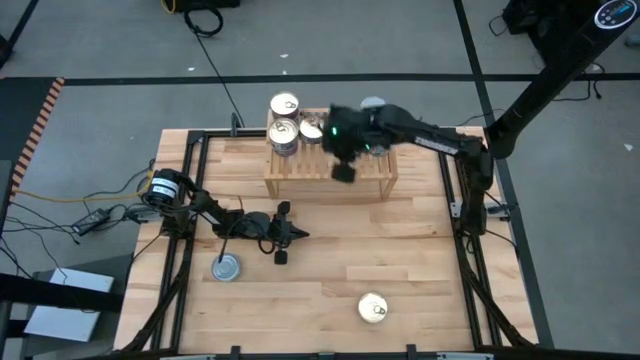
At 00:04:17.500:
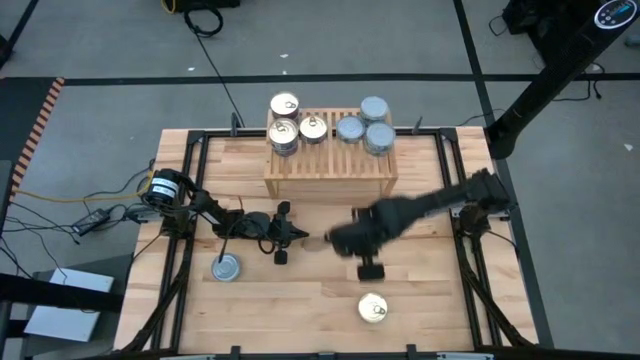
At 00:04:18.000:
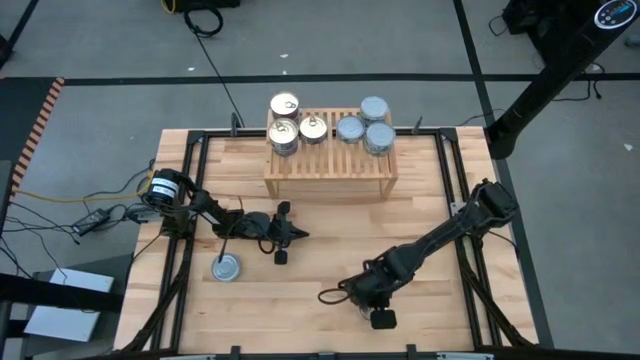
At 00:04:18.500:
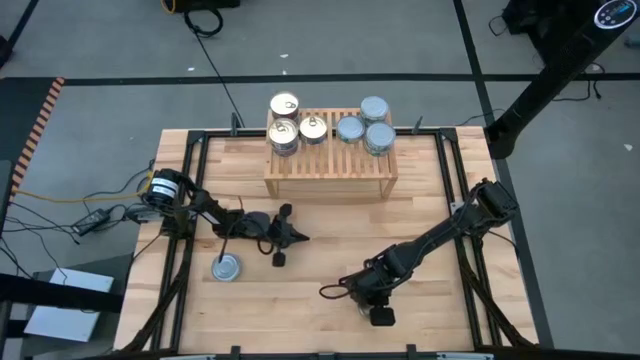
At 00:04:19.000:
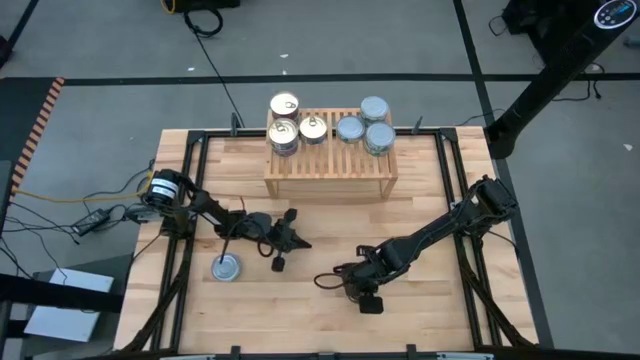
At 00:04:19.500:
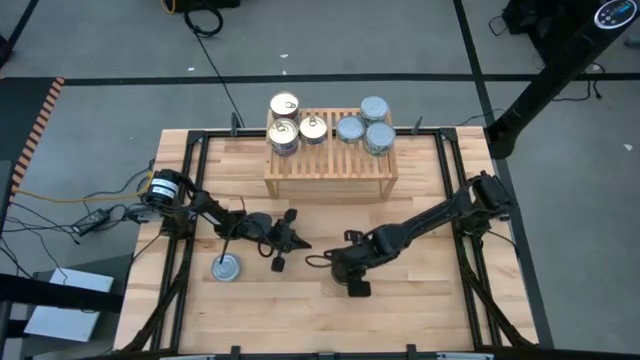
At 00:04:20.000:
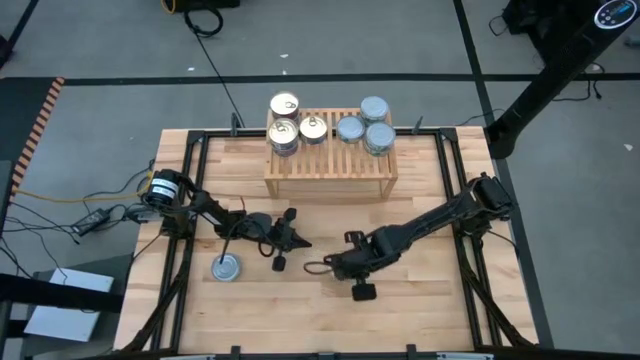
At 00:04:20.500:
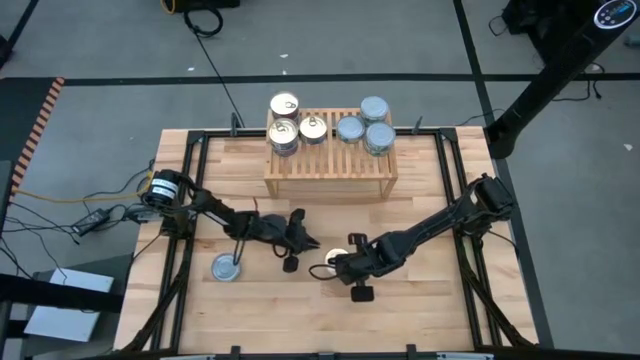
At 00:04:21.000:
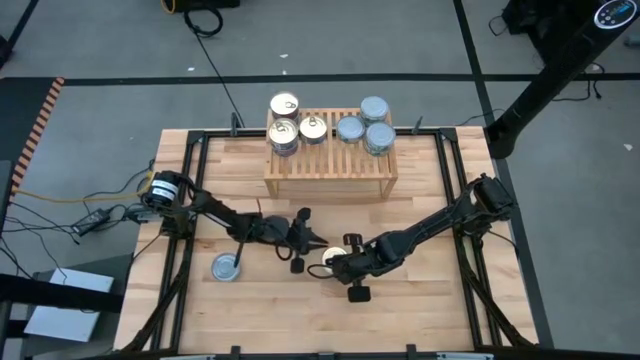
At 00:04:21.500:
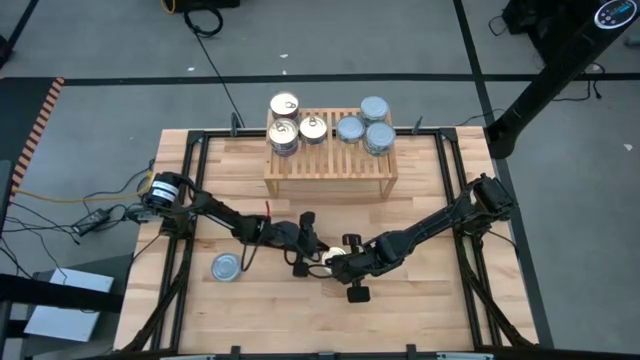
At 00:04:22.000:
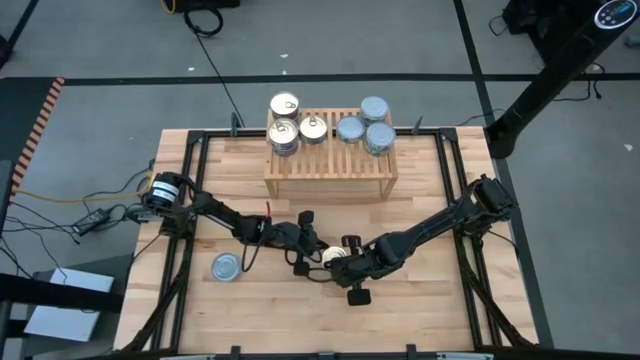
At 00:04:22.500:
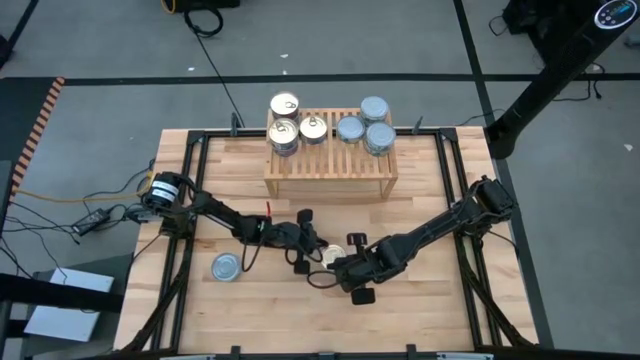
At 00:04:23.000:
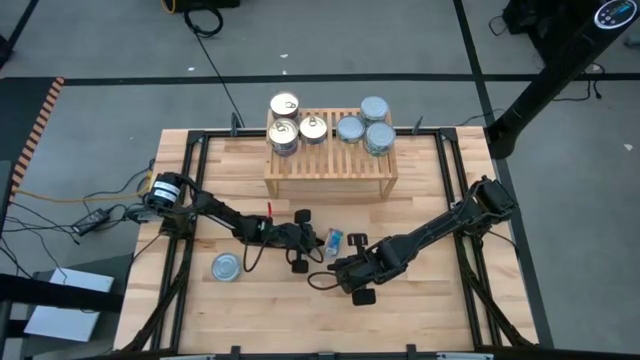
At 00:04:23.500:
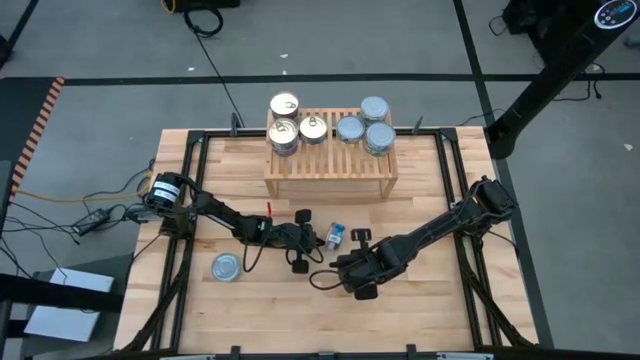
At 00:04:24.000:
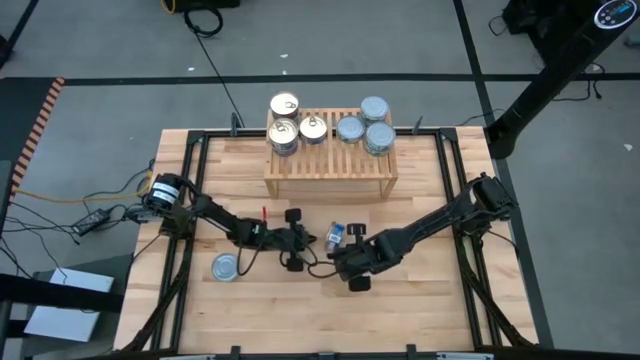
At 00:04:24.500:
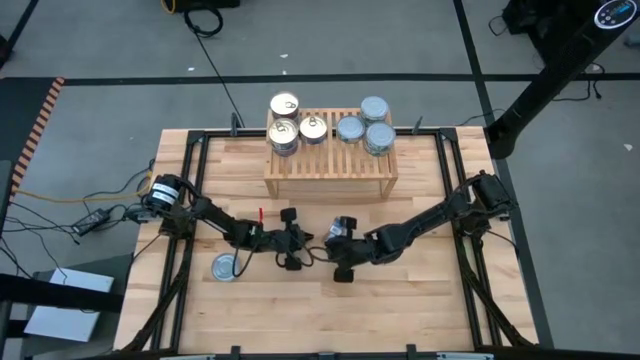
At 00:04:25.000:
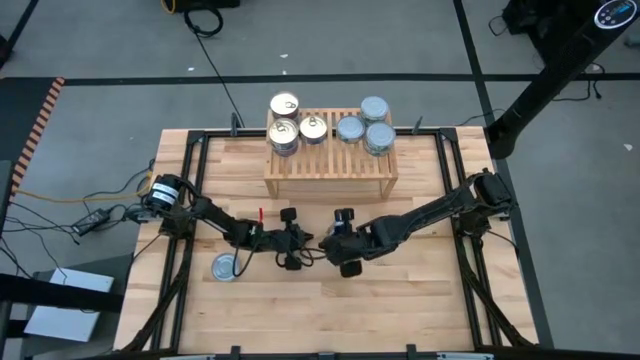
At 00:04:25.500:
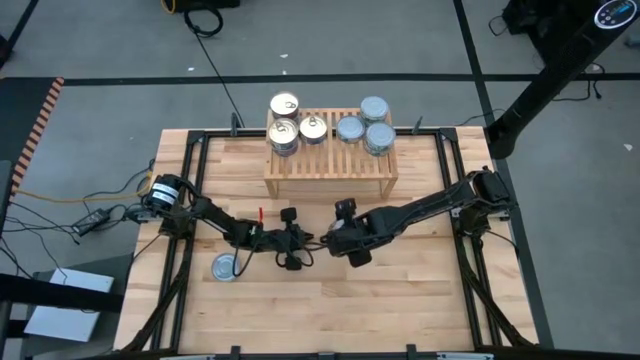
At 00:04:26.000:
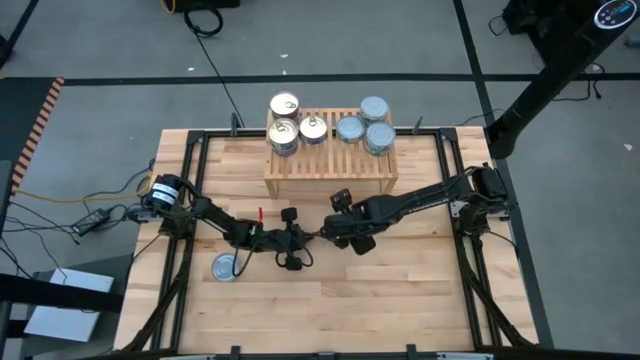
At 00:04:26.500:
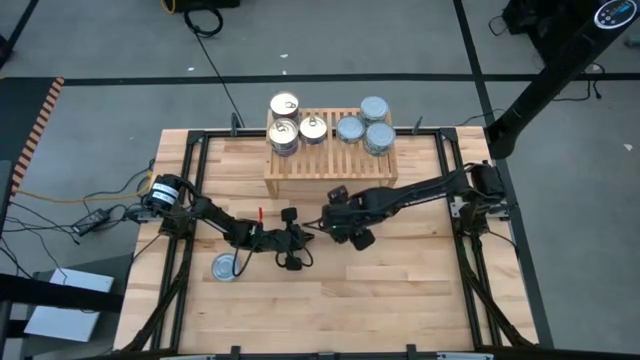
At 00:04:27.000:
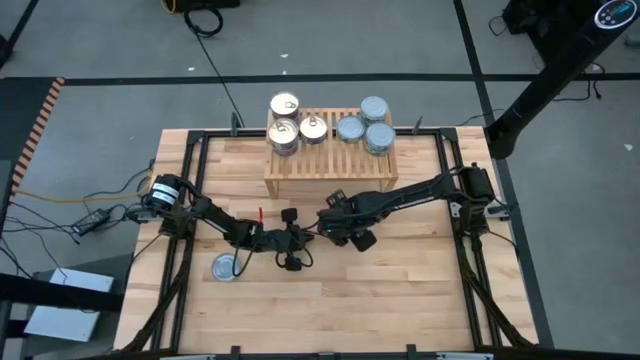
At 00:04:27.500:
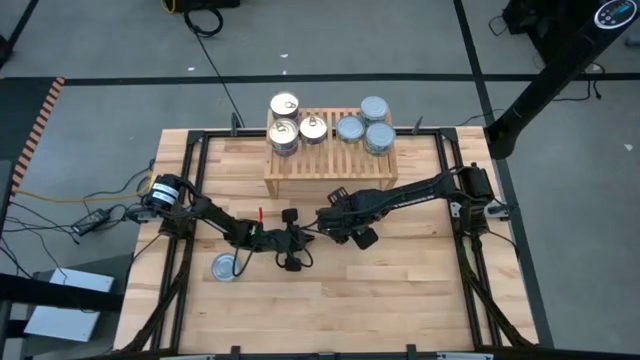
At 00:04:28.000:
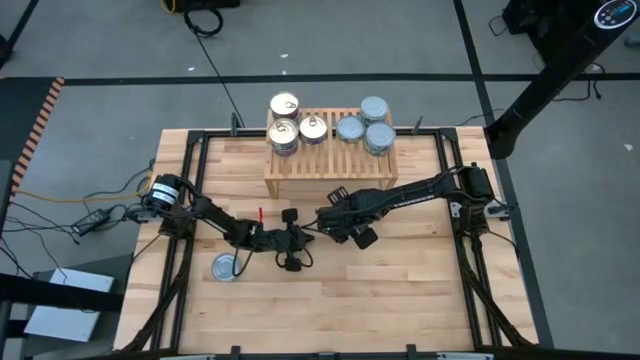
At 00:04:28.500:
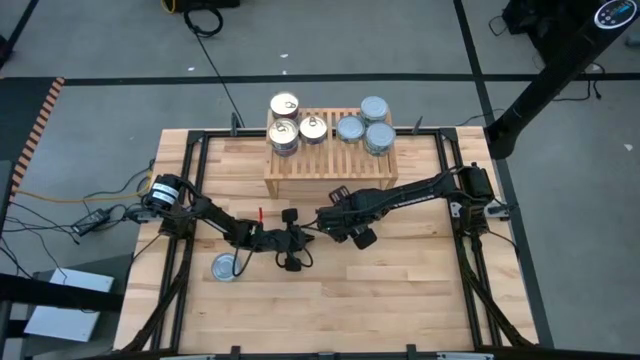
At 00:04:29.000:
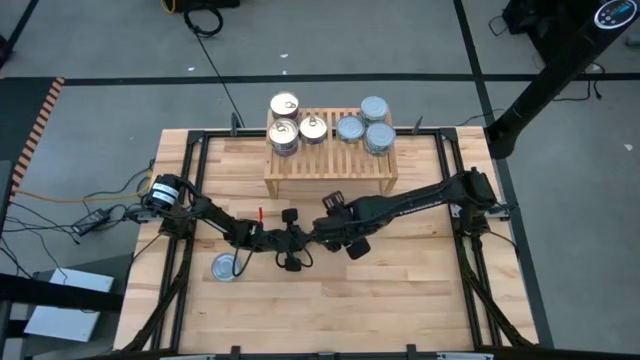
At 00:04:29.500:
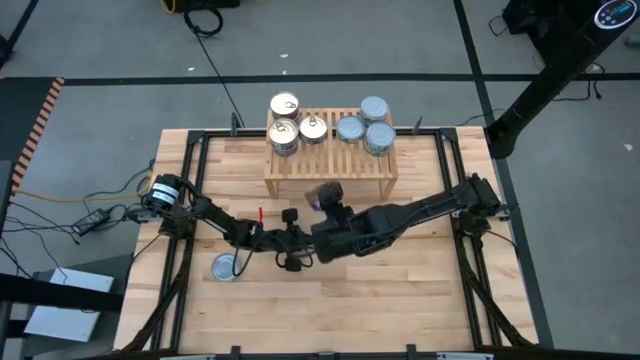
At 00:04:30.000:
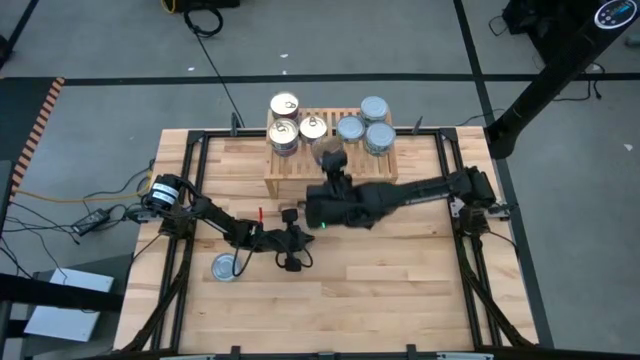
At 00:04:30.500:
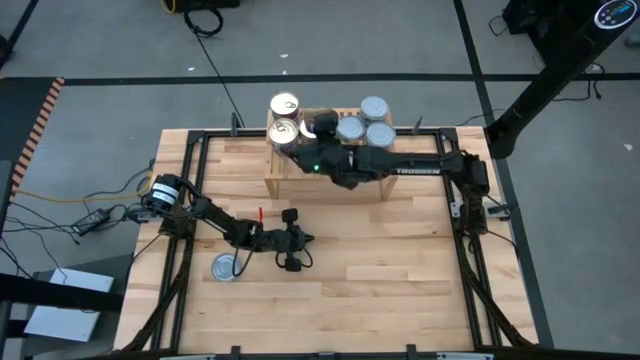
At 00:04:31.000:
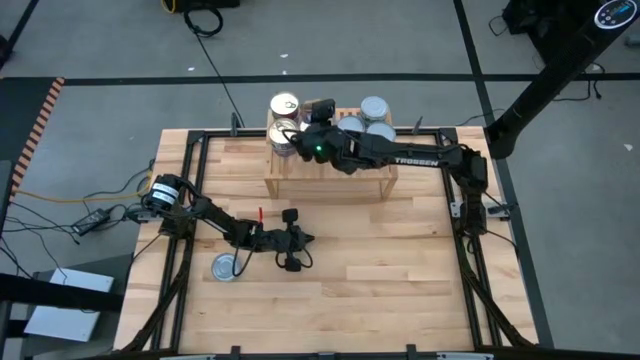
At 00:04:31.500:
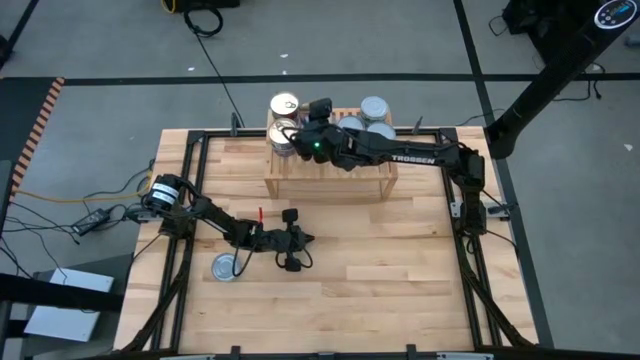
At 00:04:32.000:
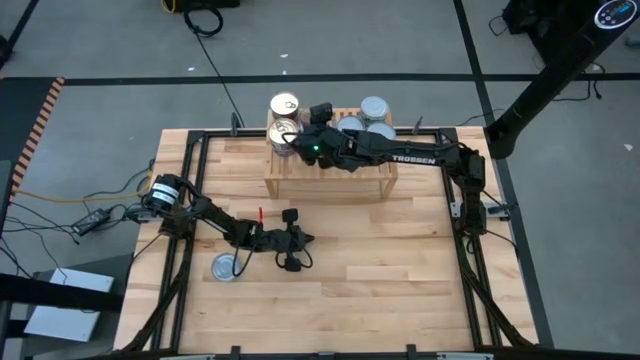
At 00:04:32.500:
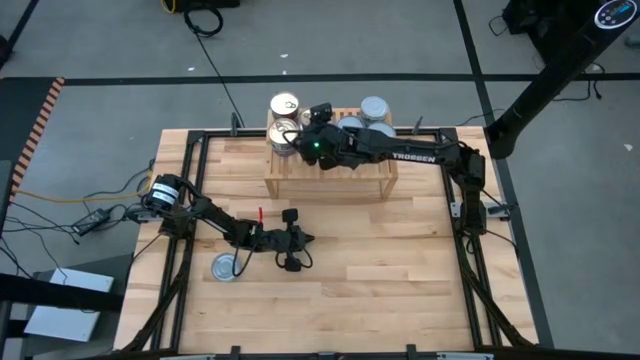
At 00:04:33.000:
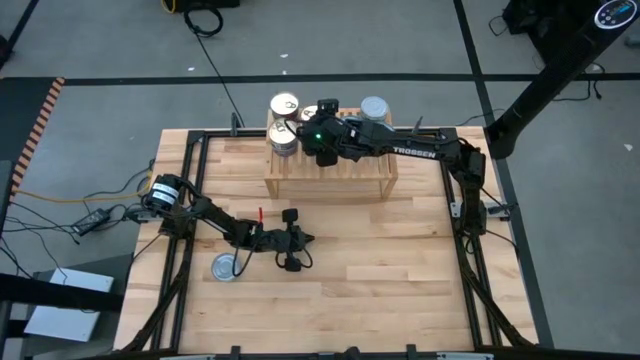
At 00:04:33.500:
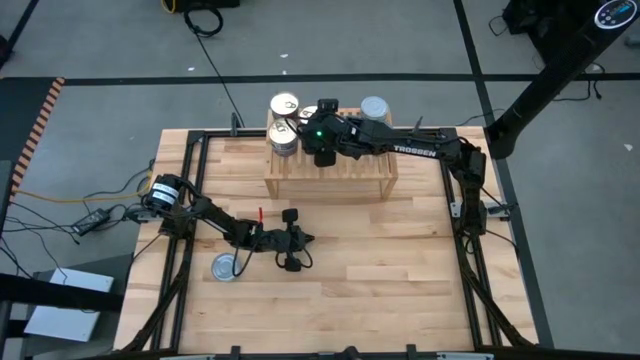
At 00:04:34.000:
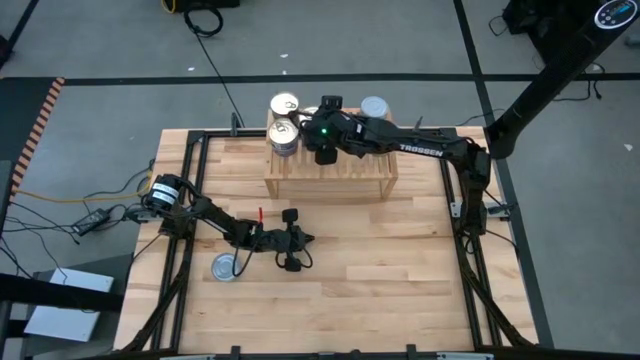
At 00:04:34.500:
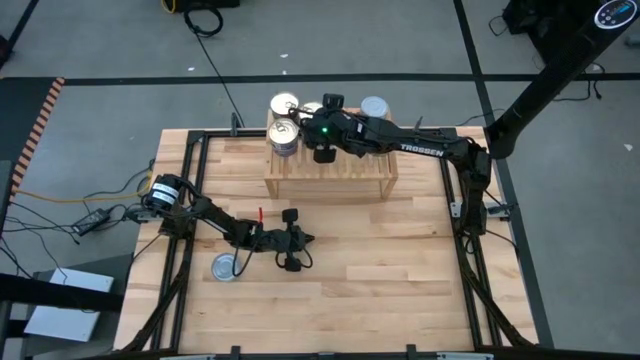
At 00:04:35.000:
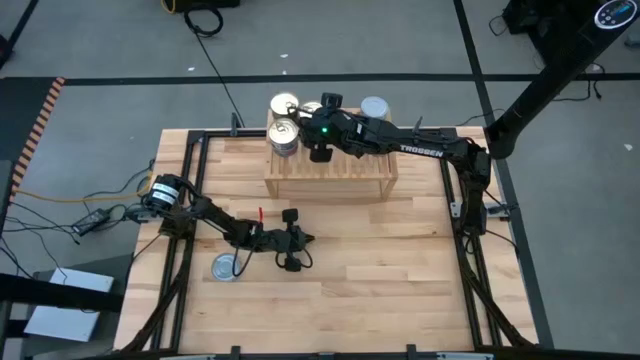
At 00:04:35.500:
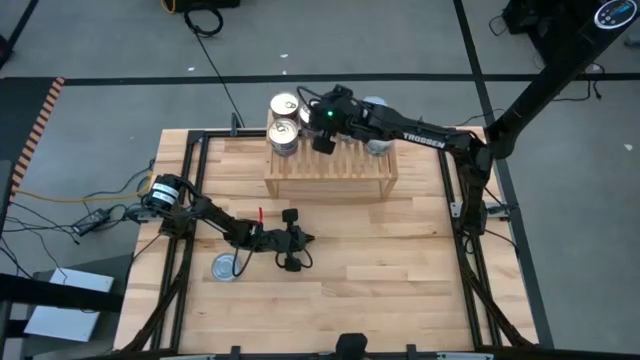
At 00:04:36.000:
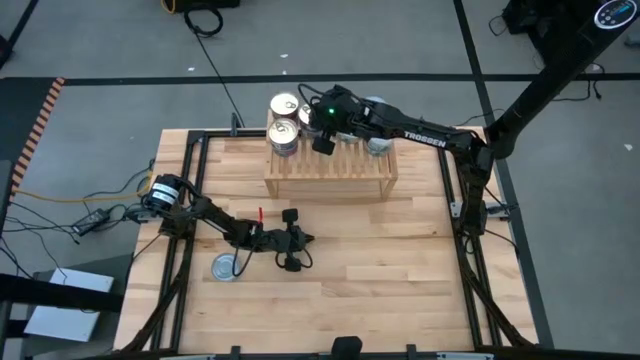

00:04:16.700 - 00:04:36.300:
Task: Stack canned seafood by type on shelf
Stack the blue pink tuna can on top of the blue pink tuna can on the shelf
